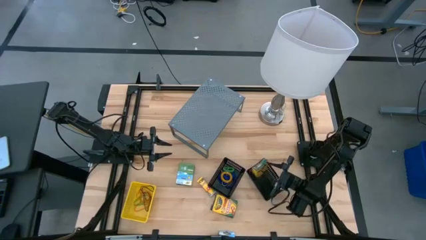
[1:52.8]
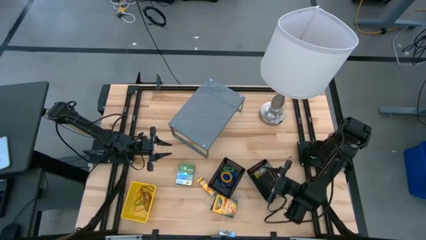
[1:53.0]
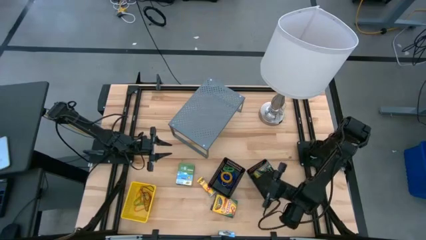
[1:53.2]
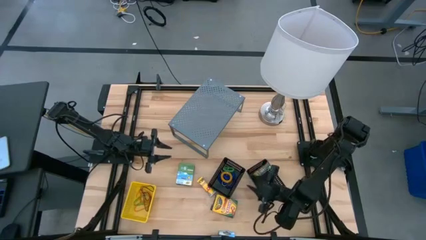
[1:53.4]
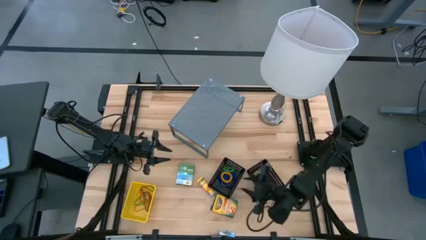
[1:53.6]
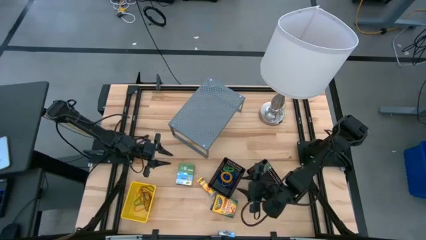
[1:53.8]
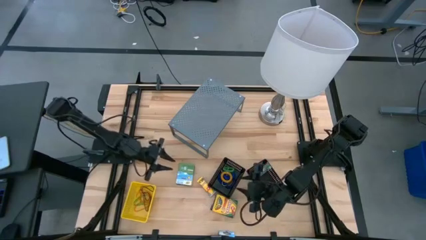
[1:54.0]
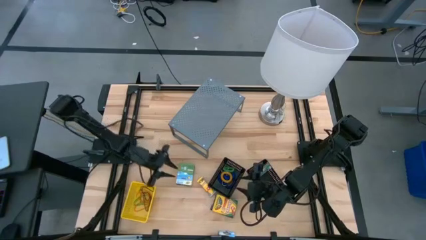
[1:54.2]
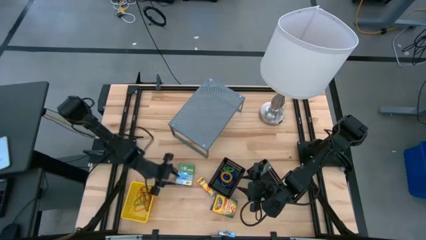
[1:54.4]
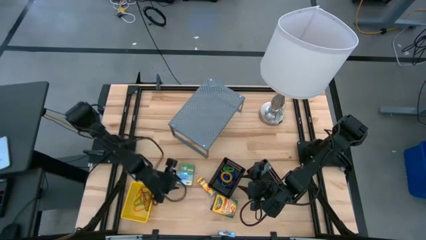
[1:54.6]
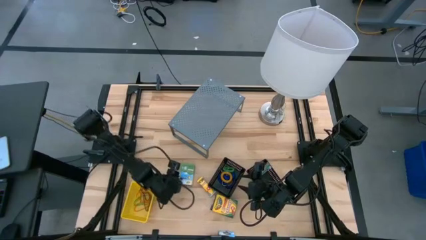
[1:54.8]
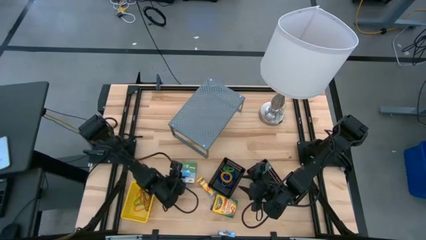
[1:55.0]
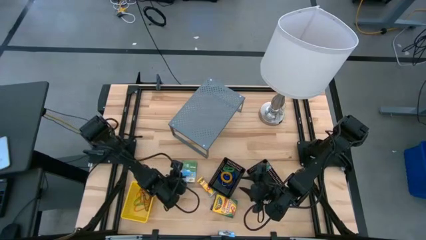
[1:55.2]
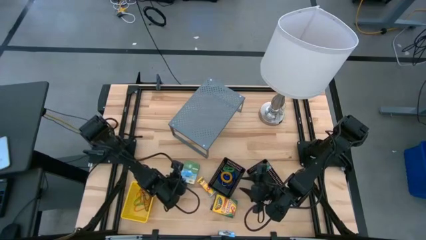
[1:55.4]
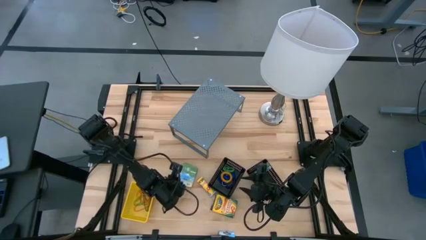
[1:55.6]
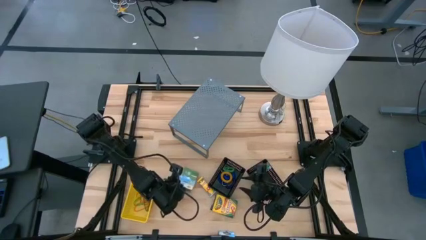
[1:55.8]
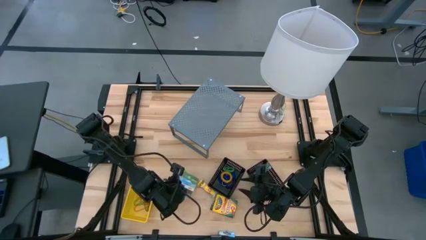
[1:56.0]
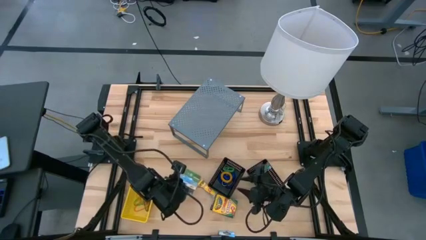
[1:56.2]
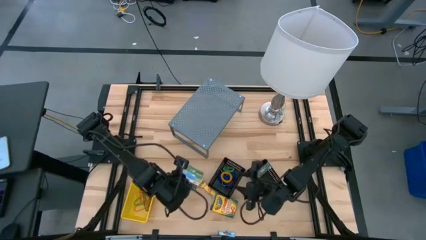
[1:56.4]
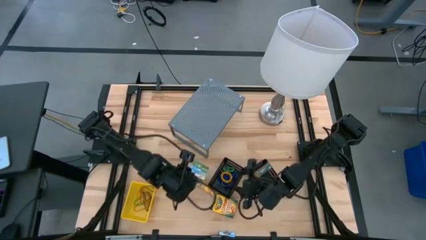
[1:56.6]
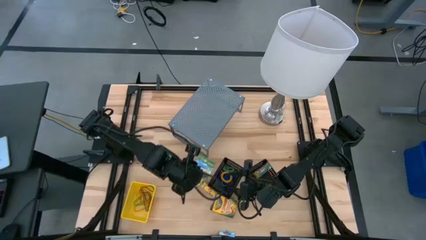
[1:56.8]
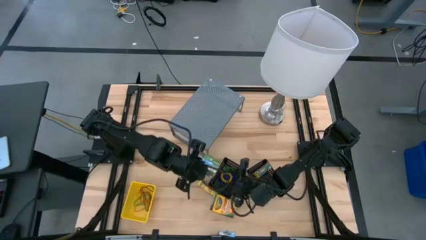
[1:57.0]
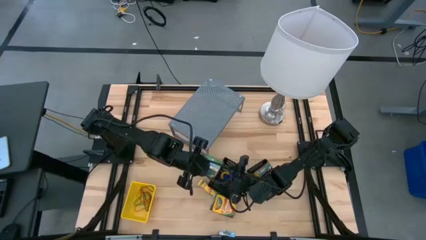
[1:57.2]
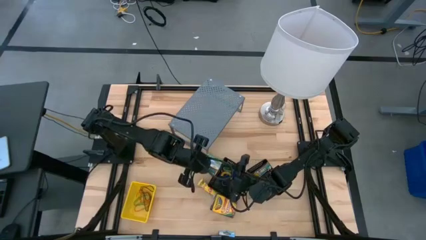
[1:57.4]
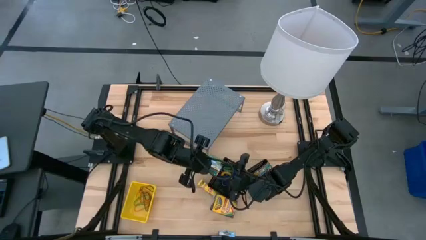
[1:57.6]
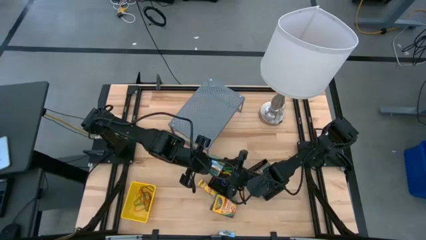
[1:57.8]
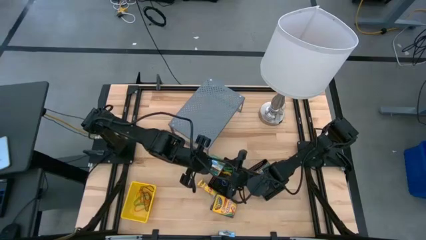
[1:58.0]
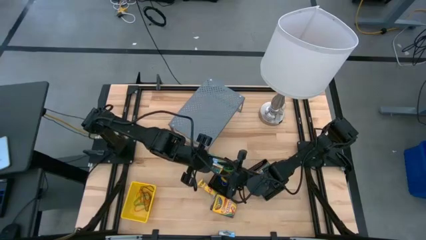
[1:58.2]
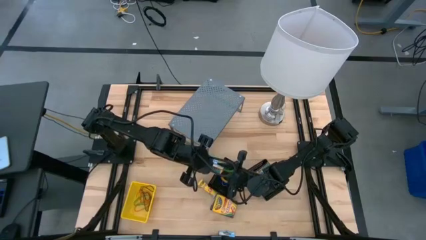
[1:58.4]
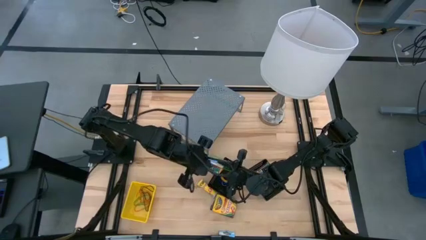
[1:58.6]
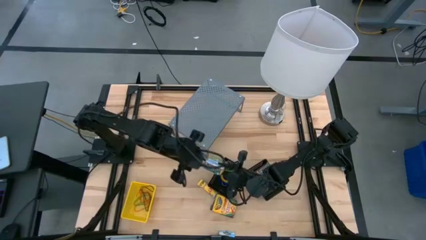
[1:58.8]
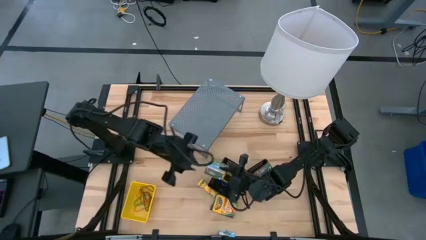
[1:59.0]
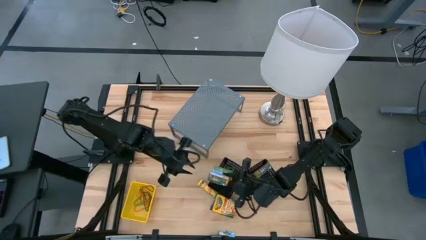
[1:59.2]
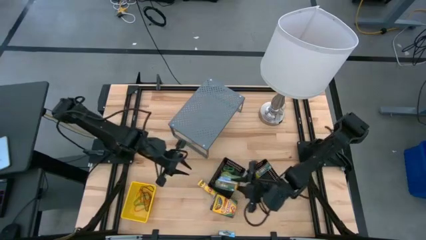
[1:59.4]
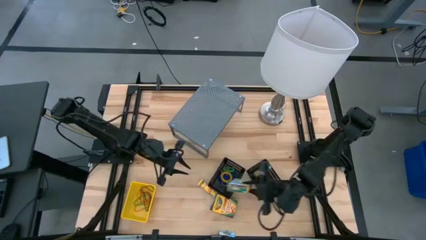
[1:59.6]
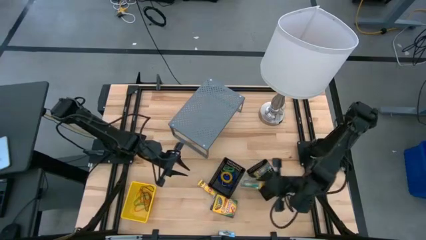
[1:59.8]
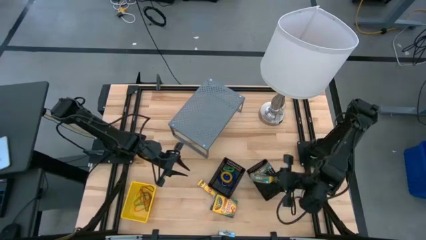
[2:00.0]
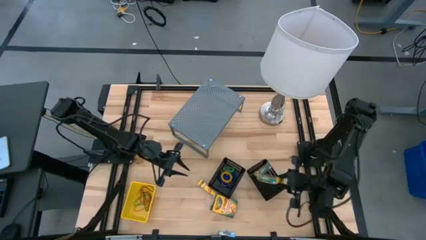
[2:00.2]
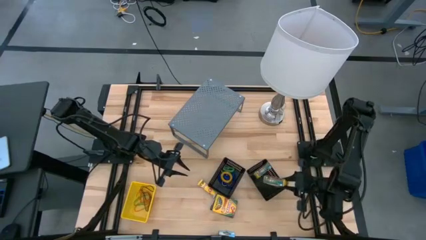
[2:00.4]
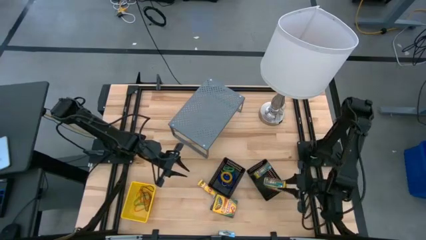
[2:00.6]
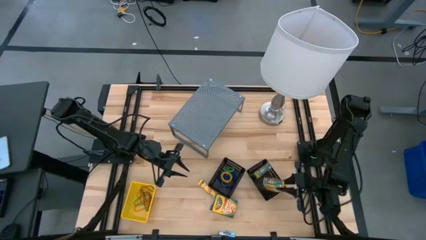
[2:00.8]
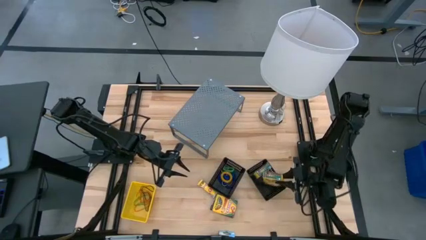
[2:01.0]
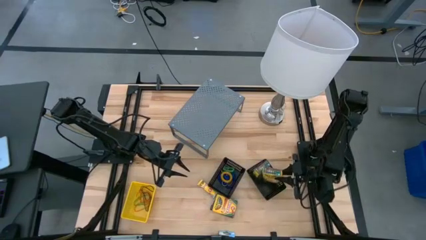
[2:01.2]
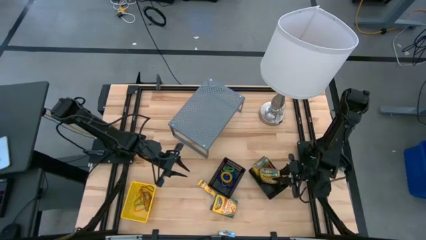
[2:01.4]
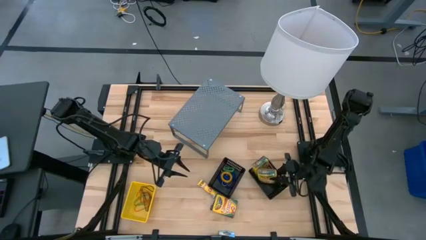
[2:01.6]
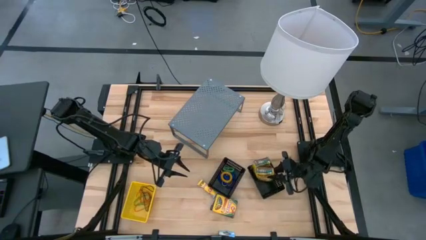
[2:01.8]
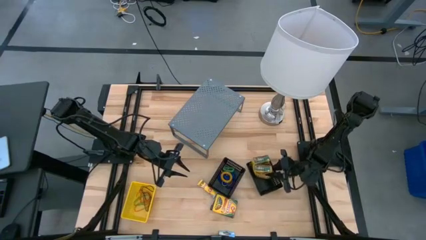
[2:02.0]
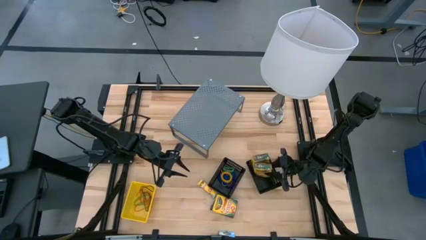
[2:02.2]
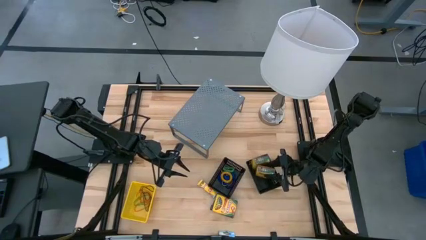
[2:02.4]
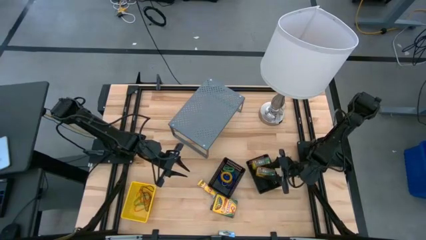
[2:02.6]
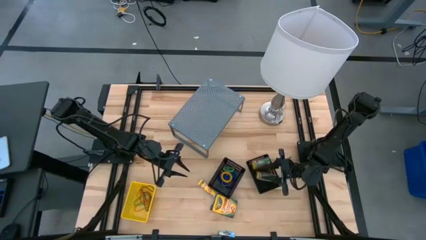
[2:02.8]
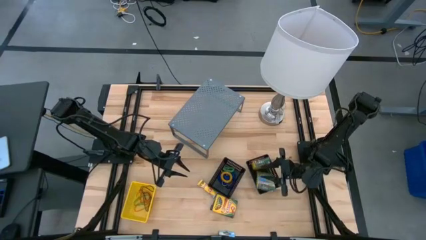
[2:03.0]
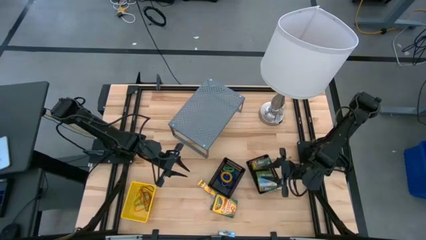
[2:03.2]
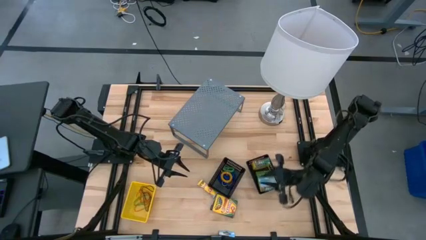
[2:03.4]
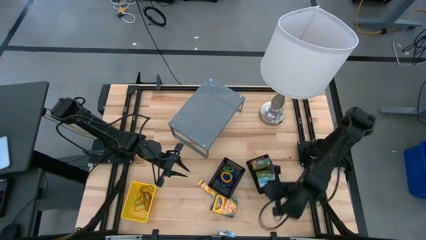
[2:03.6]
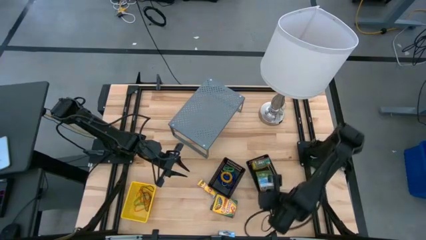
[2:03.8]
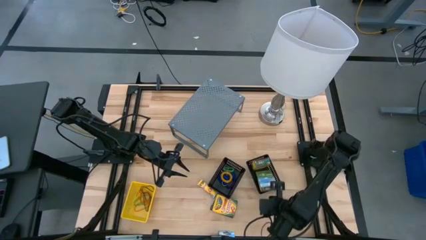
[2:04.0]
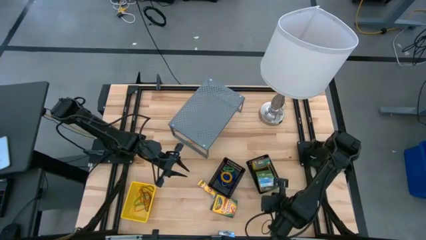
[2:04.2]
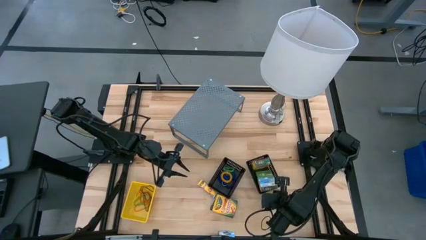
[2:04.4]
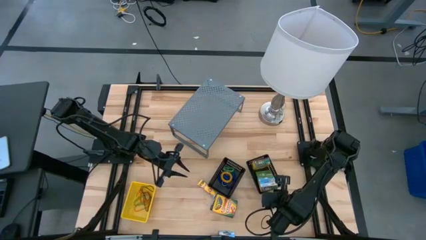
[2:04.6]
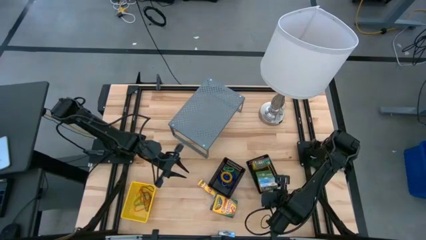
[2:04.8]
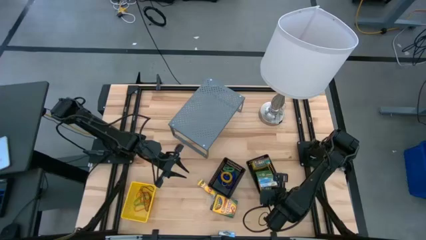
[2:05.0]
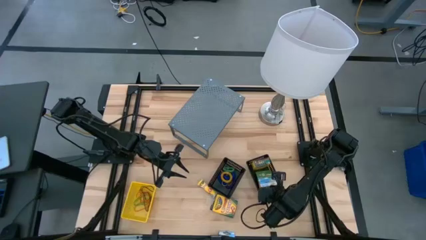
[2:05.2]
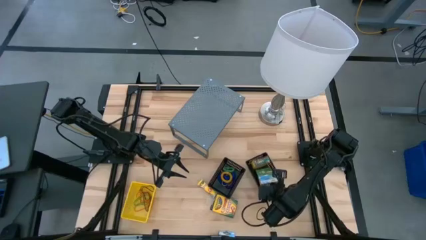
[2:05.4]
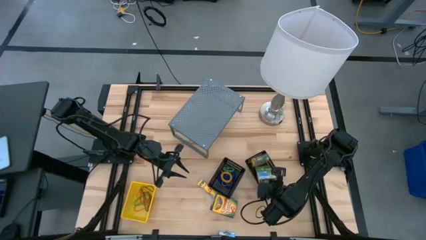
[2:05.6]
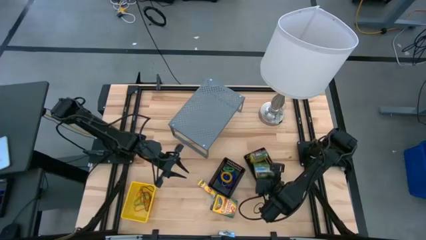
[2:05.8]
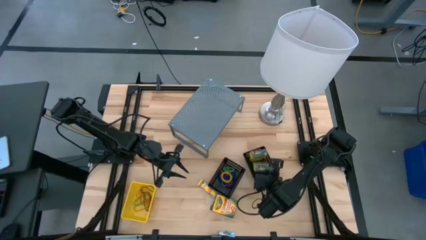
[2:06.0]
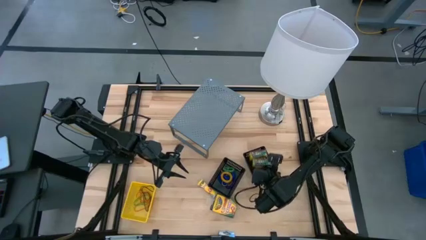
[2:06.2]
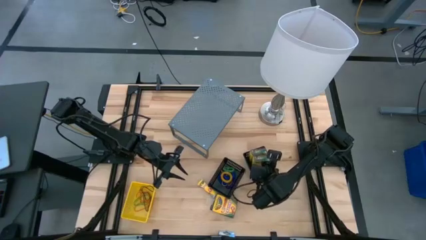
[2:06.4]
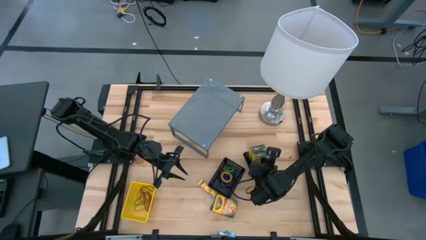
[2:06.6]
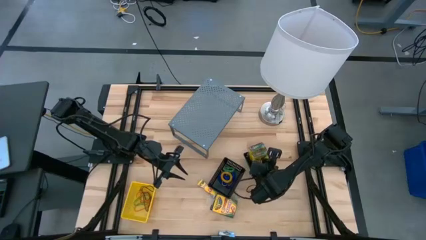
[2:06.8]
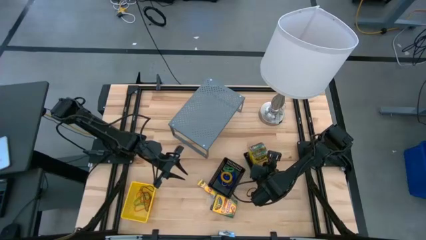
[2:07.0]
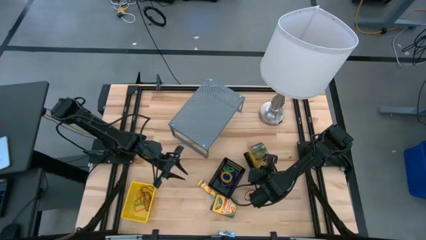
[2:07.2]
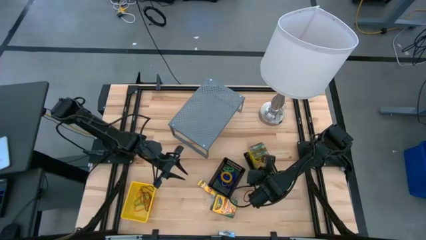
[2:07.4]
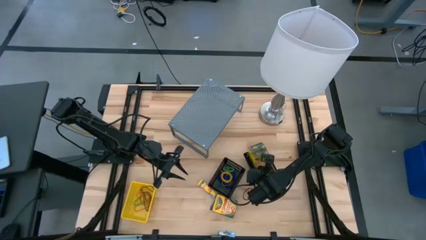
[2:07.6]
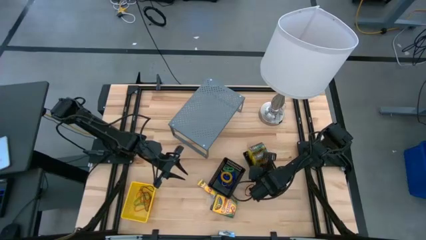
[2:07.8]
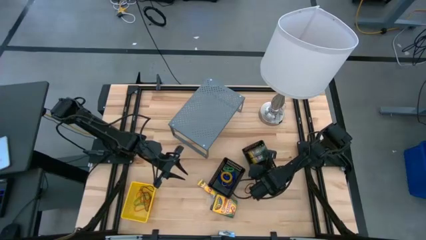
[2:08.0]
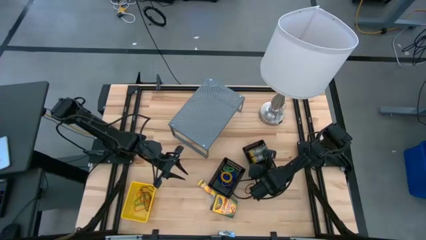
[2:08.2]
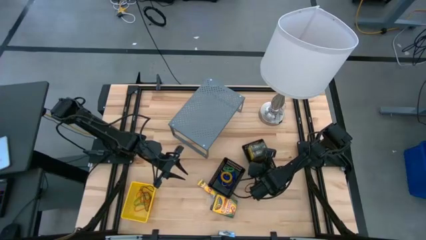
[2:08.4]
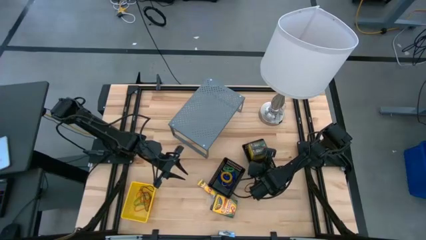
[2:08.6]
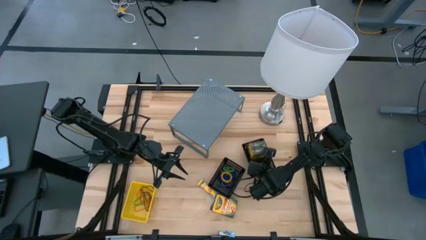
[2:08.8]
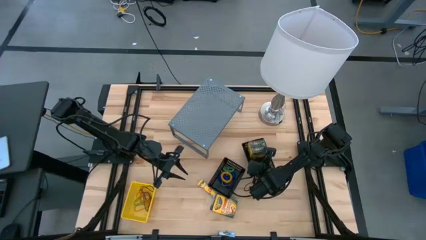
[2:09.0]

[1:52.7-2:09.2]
Task: Pick & Place Office Desk Supplies
Put the box of crayons into right black bin
